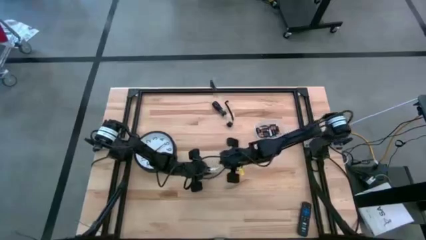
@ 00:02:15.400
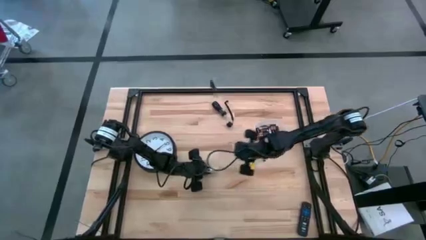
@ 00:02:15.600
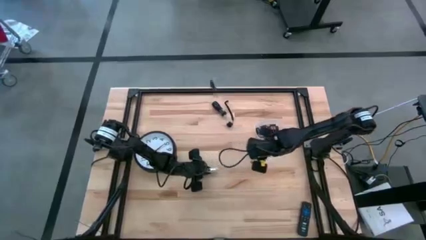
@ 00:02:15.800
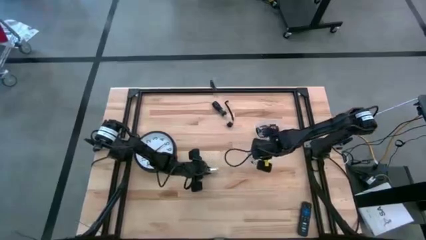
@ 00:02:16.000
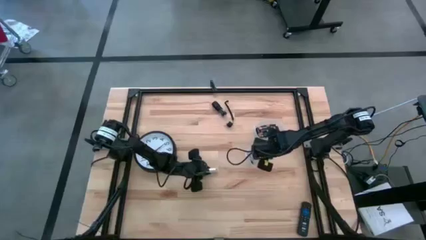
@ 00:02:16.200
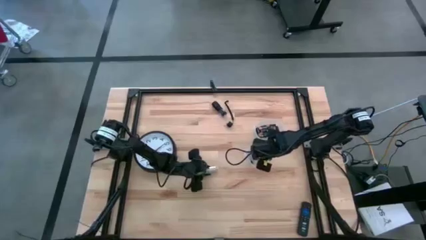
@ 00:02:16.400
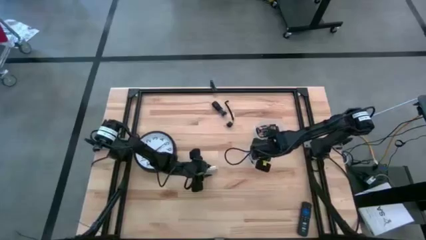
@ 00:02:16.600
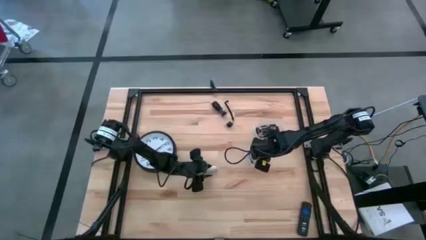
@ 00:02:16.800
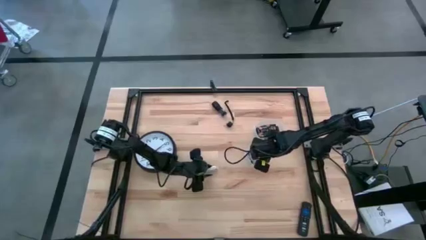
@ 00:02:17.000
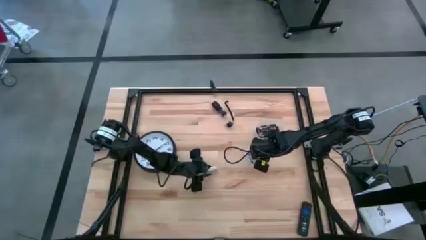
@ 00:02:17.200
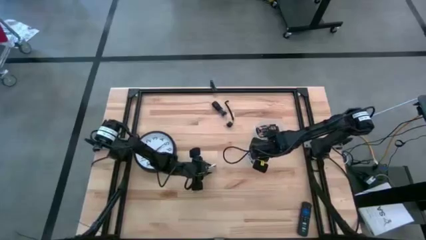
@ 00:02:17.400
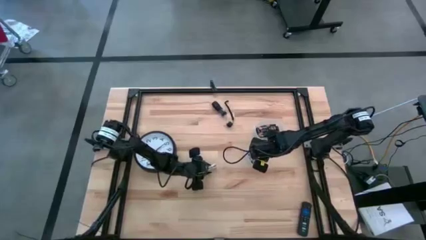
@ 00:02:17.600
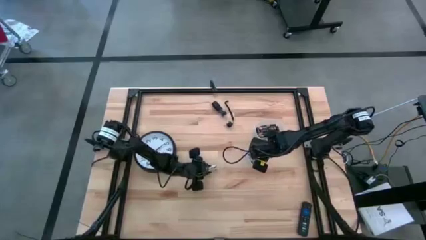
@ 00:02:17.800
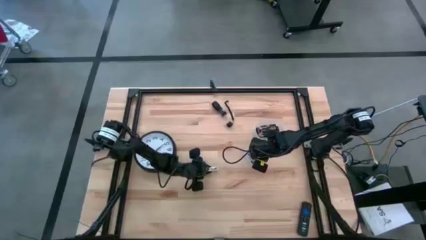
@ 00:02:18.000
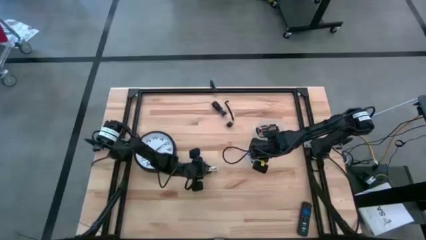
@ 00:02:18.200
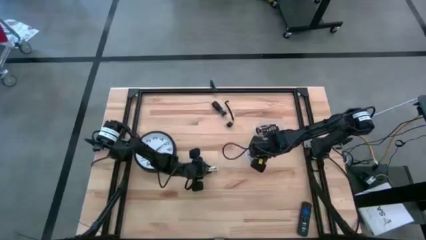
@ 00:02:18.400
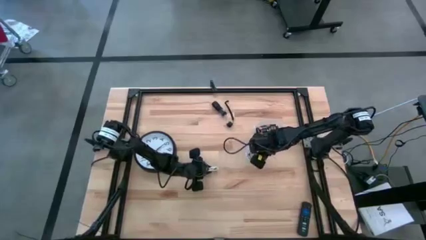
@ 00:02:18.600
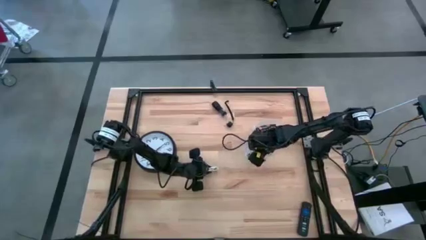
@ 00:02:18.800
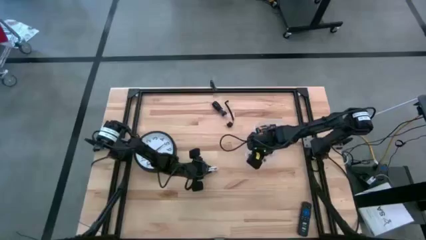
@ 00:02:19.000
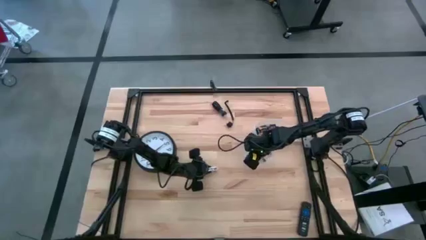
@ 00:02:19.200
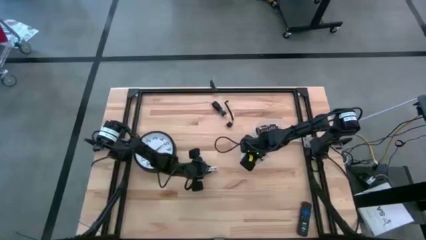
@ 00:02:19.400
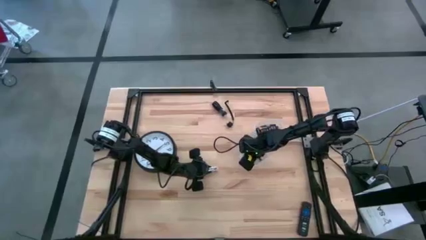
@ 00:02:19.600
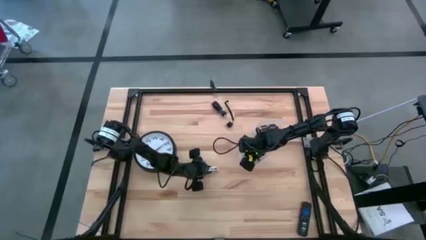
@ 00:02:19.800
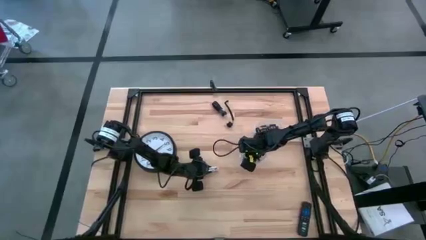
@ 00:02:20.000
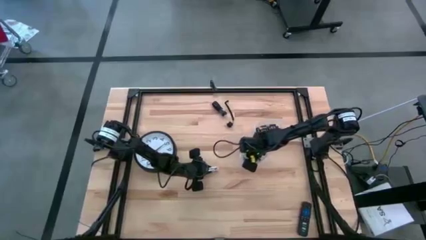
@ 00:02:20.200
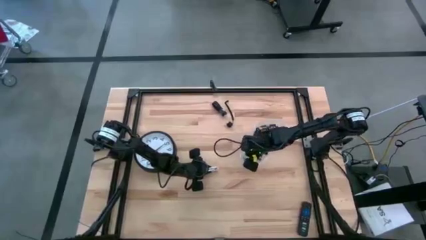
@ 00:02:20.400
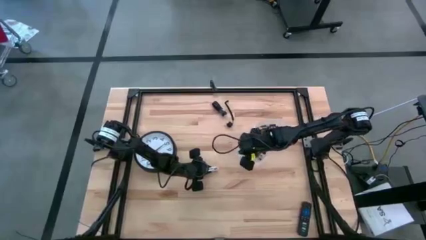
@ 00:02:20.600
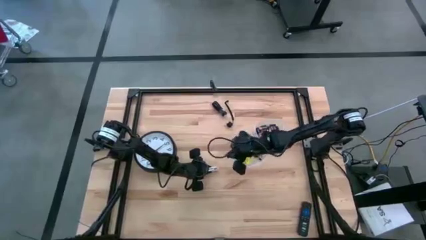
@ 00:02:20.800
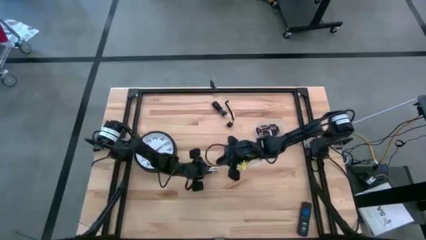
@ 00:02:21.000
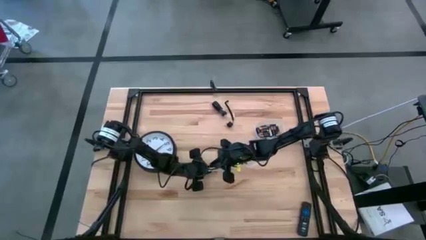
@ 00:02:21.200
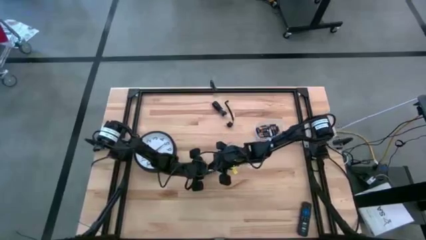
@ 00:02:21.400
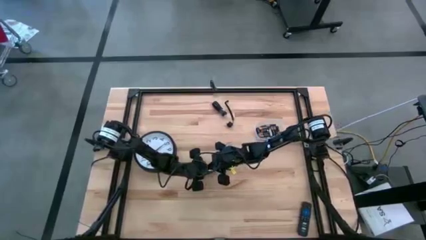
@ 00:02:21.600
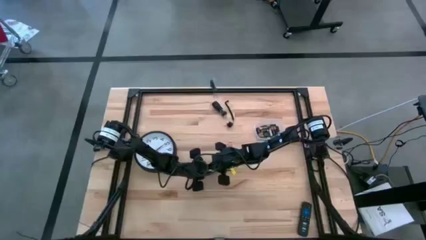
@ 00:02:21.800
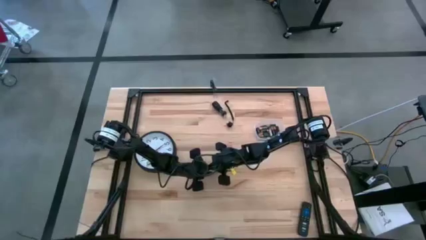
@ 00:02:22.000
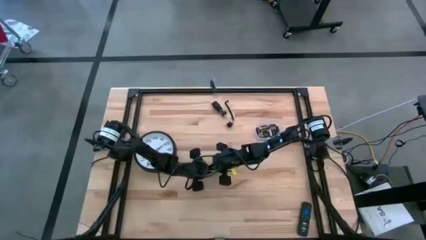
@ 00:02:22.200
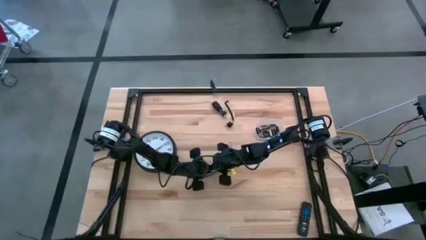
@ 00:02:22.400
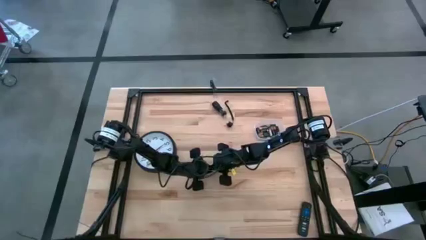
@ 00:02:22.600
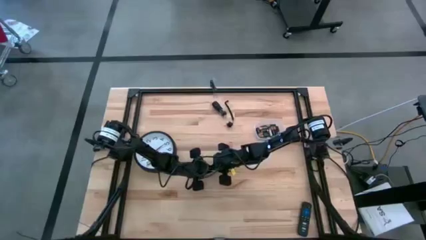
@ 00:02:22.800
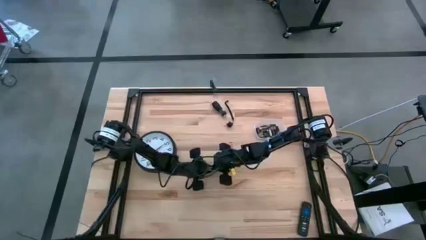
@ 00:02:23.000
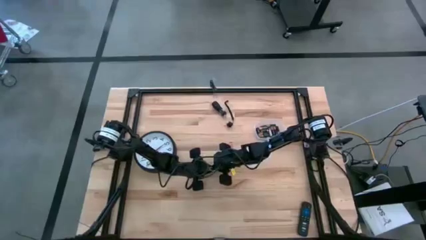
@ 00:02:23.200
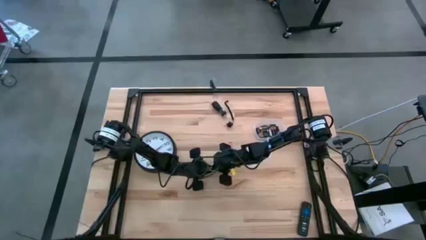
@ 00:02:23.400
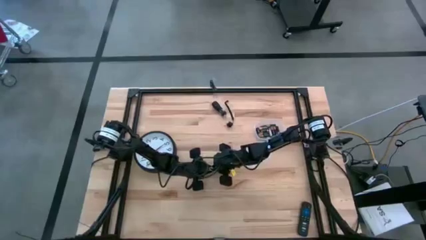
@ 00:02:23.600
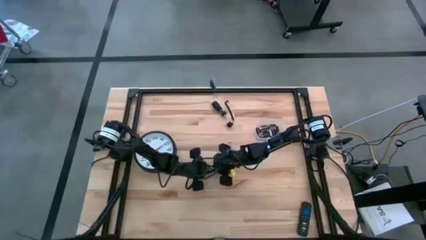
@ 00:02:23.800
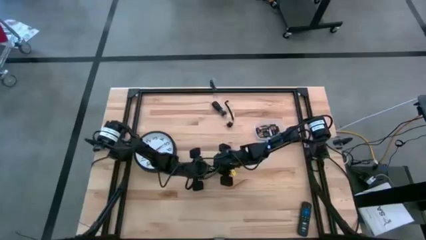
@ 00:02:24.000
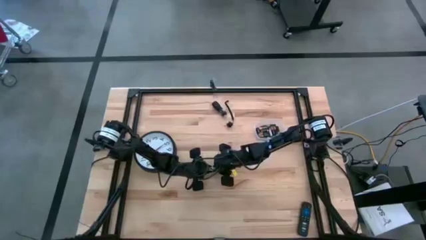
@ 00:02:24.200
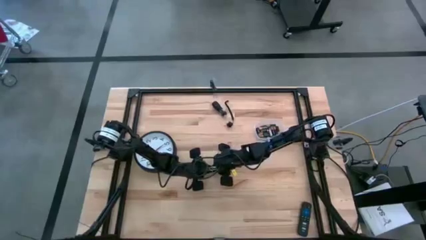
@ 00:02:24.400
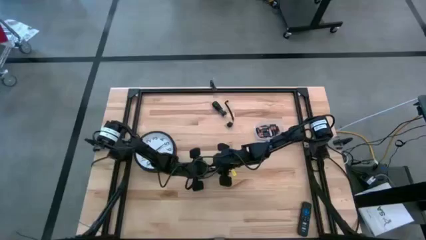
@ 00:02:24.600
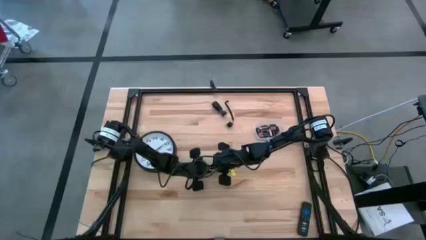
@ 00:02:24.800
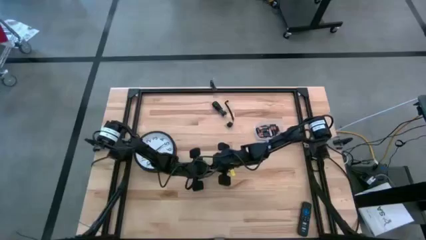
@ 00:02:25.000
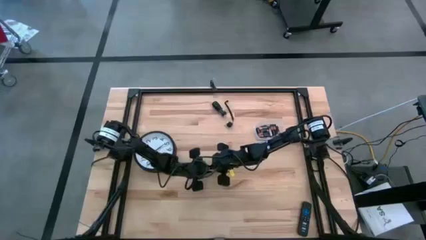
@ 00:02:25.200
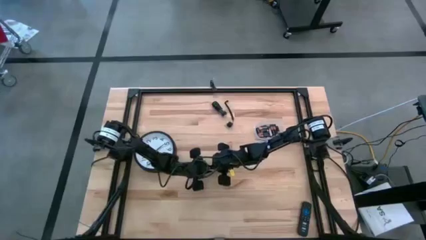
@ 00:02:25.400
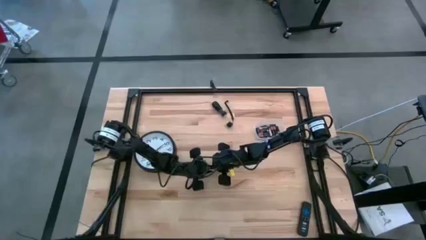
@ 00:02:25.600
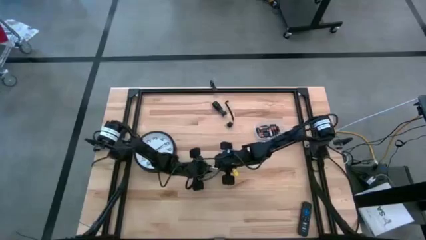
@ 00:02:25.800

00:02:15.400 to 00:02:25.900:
Task: Insert battery
Insert the silver battery into the white flashlight battery holder

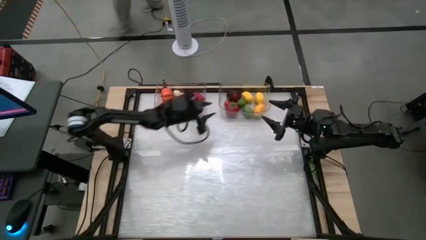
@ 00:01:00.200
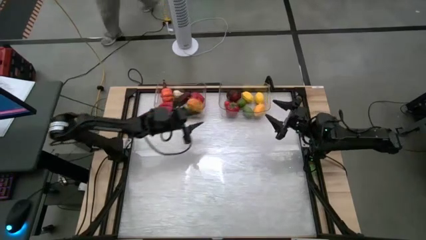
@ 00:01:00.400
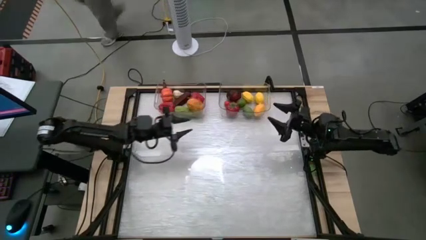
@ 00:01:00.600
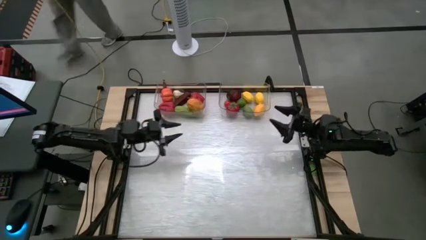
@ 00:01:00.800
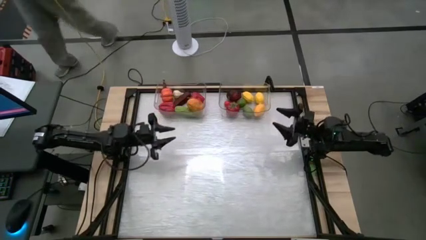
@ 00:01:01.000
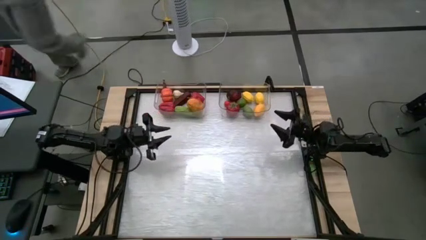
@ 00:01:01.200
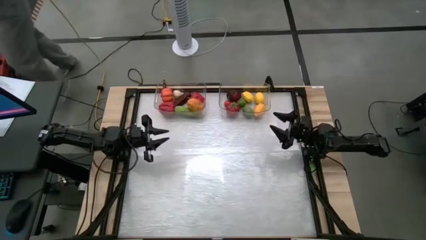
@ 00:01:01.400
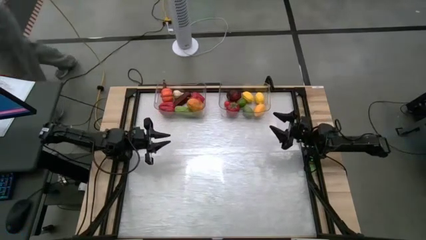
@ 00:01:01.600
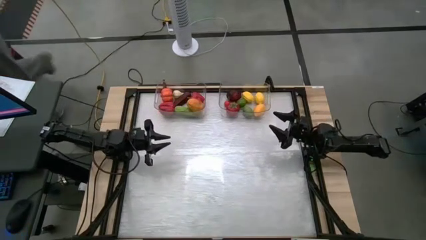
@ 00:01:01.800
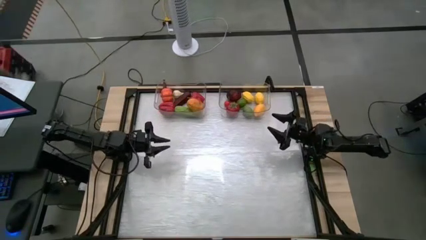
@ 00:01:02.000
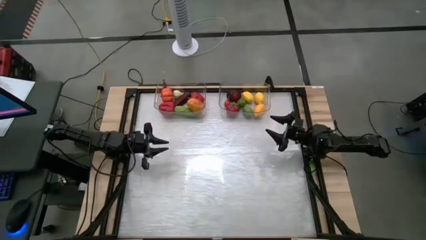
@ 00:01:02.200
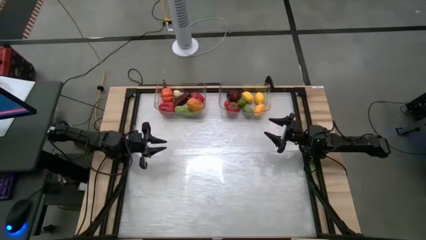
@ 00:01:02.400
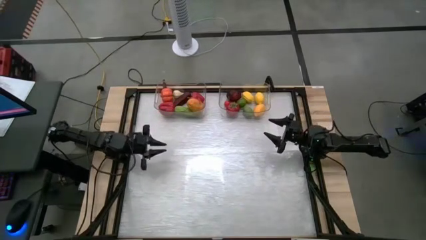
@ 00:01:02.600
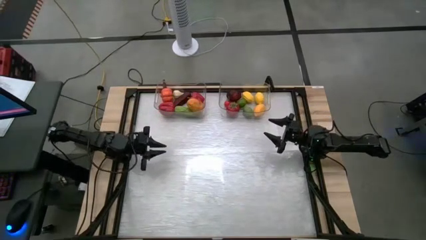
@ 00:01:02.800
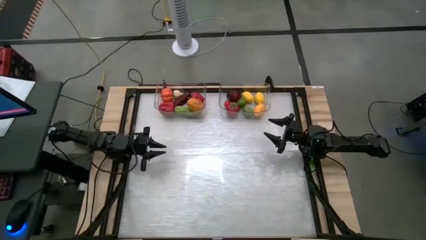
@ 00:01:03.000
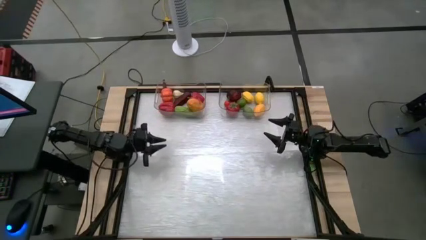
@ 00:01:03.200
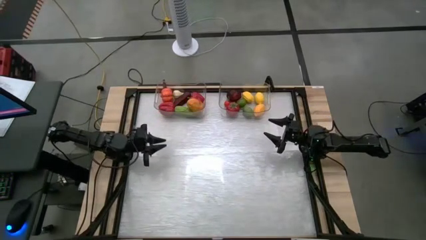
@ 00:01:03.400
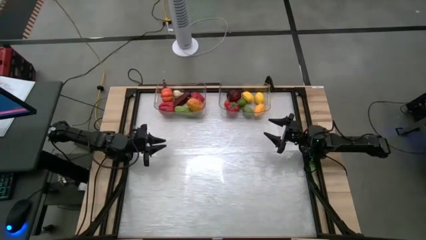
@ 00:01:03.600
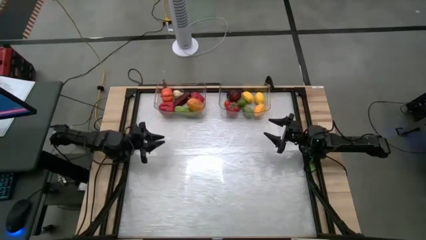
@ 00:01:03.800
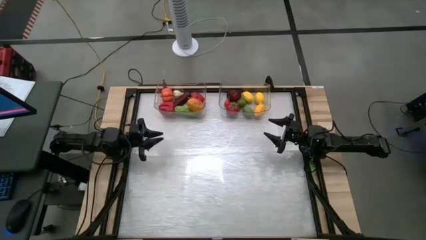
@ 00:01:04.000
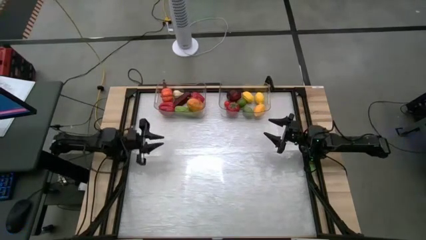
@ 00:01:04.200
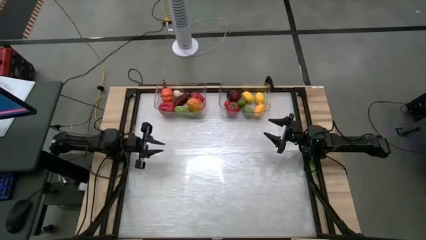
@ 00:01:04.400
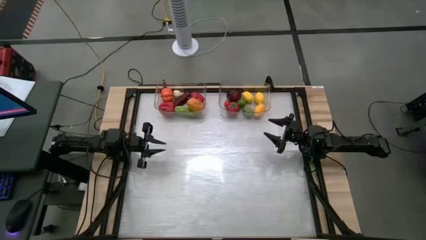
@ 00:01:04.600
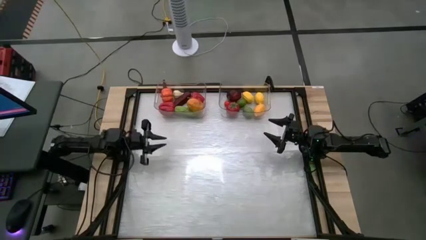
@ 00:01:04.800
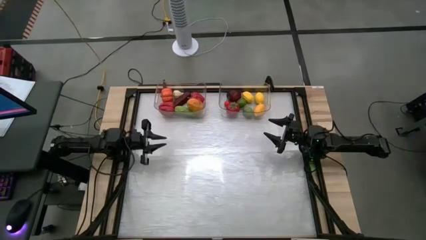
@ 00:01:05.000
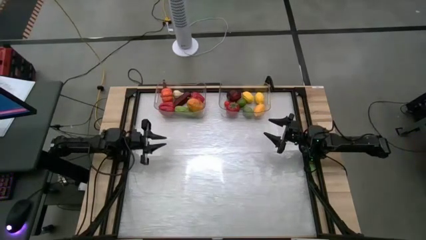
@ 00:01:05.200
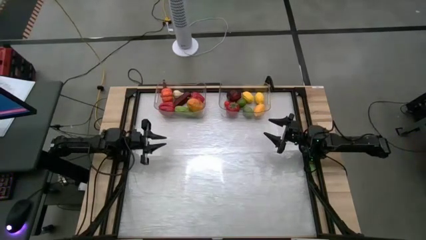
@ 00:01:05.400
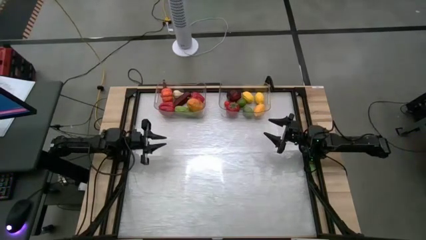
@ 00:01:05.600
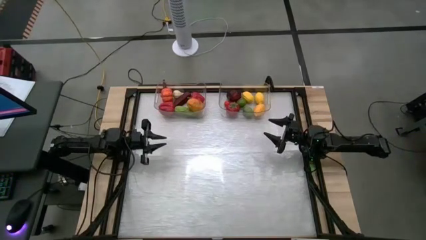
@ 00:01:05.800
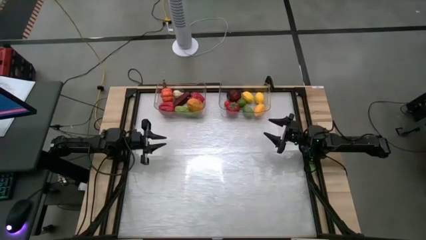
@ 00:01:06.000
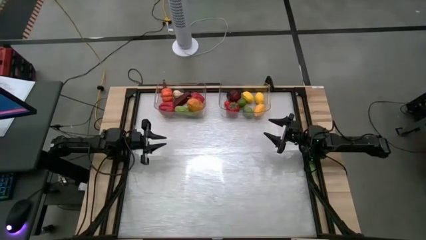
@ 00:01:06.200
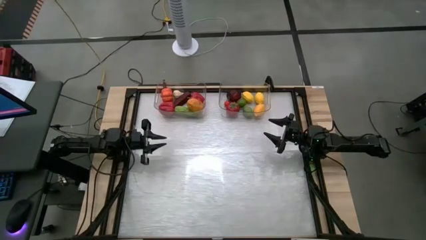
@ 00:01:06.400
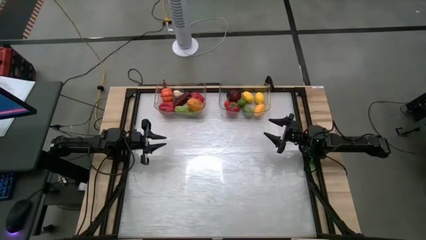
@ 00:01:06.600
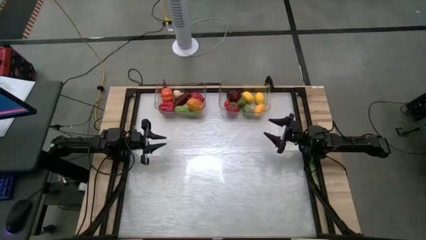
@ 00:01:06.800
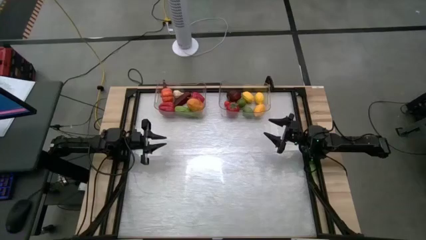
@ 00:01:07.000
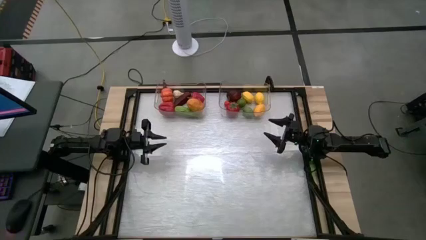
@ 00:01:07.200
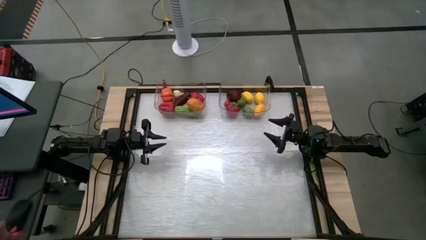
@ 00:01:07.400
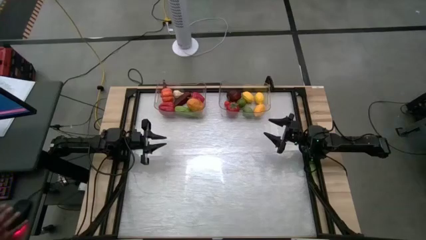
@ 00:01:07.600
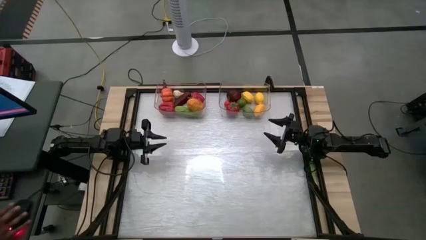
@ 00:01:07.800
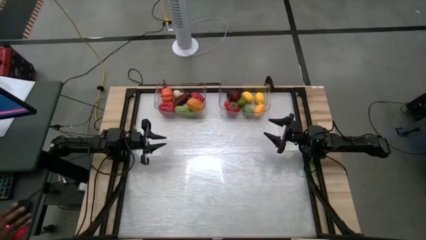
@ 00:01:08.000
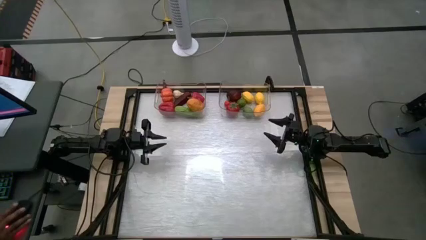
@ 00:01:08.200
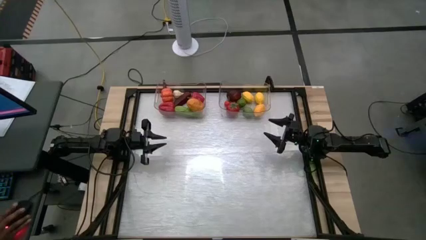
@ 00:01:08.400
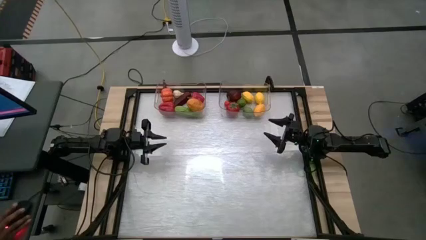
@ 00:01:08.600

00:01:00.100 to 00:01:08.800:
Task: Sort produce into baskets
Return to Home position
